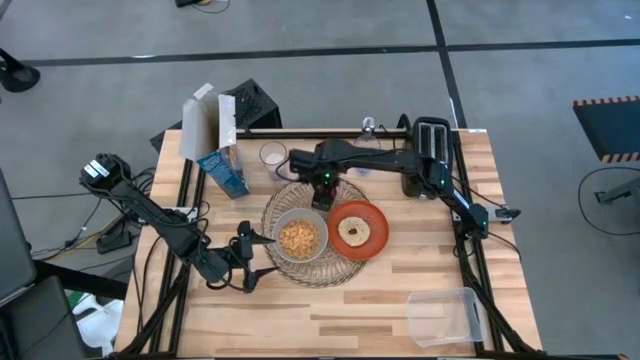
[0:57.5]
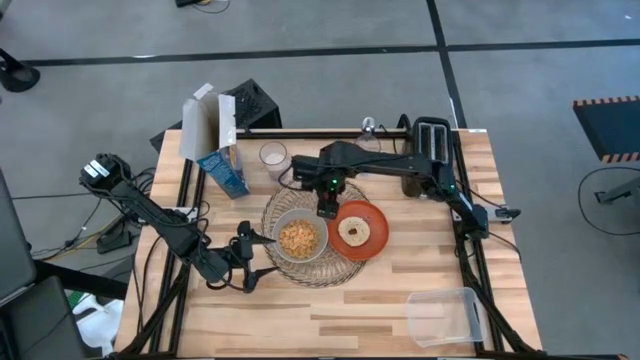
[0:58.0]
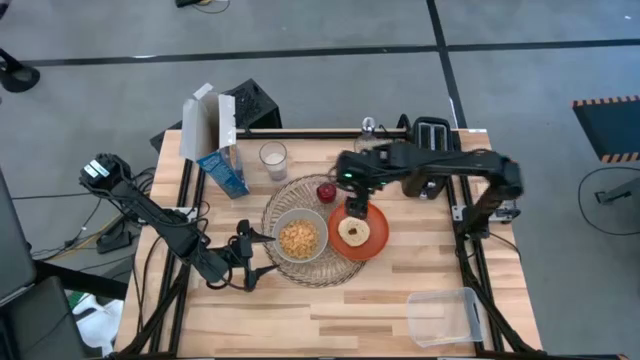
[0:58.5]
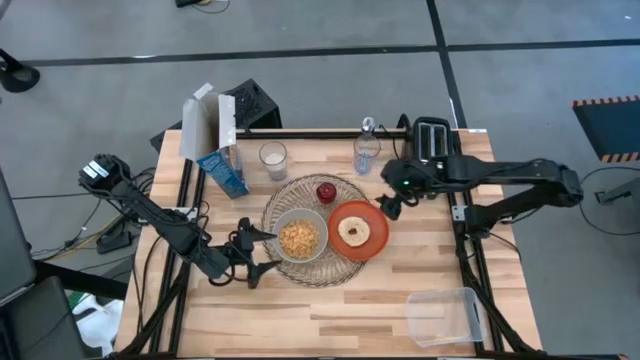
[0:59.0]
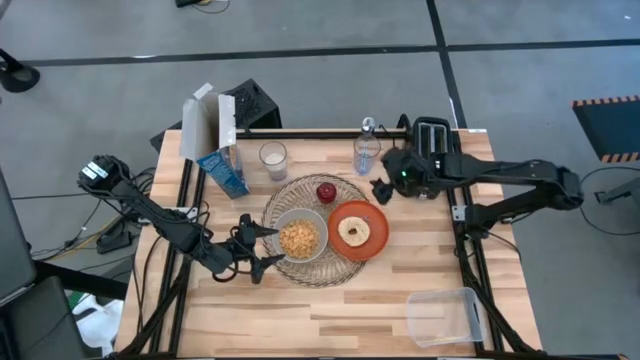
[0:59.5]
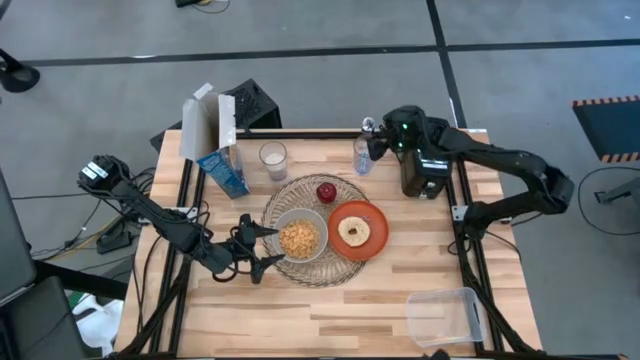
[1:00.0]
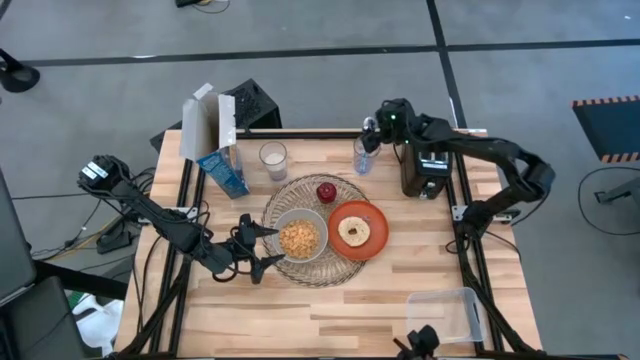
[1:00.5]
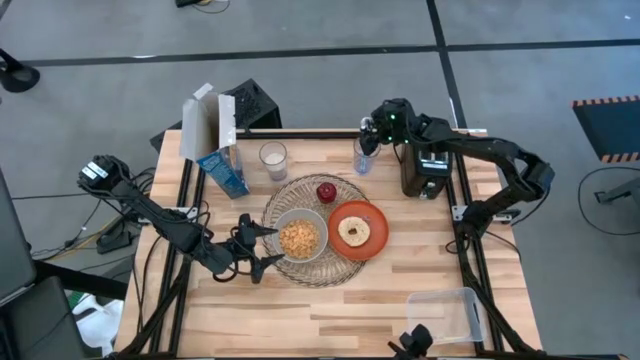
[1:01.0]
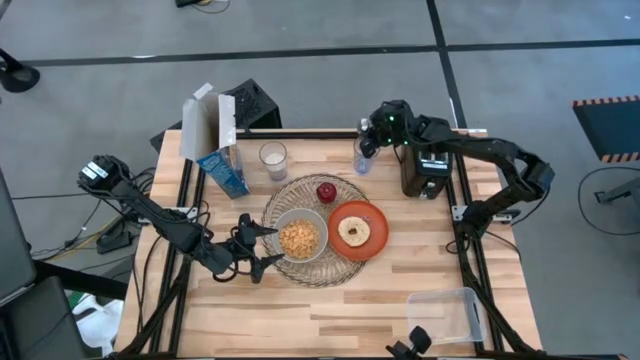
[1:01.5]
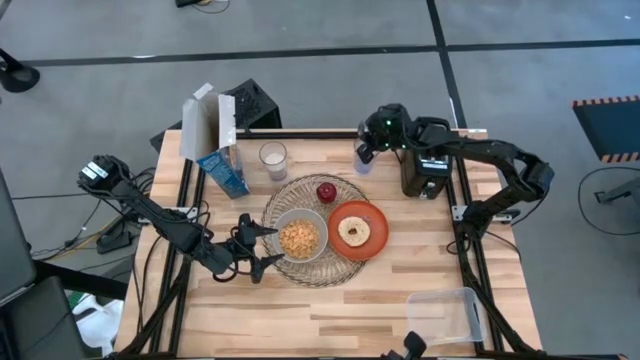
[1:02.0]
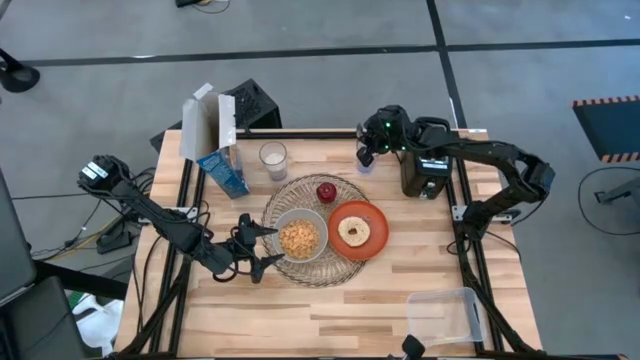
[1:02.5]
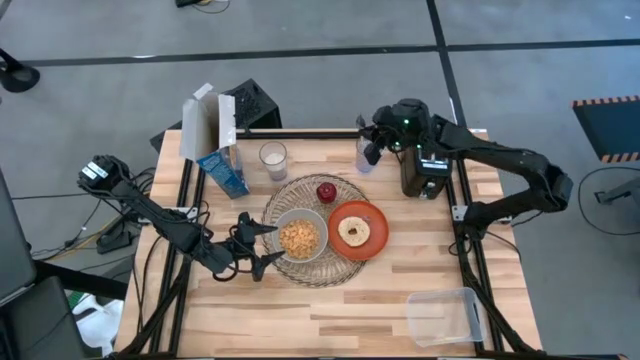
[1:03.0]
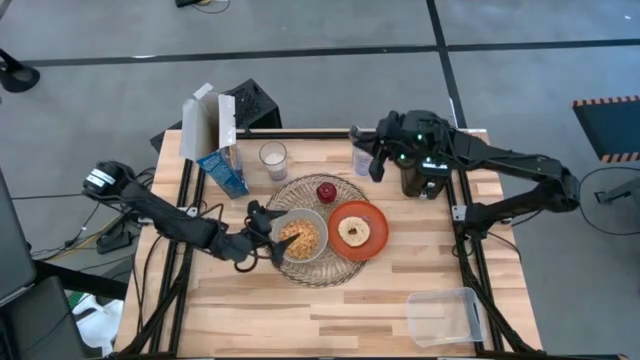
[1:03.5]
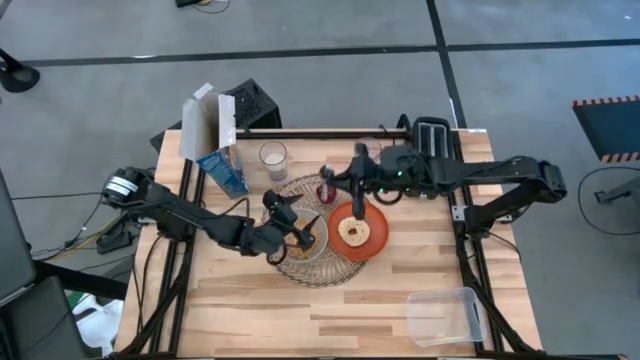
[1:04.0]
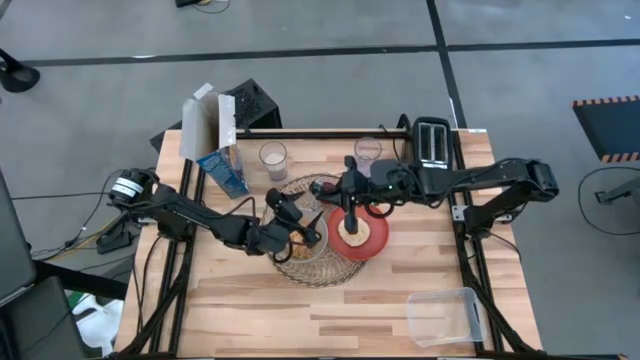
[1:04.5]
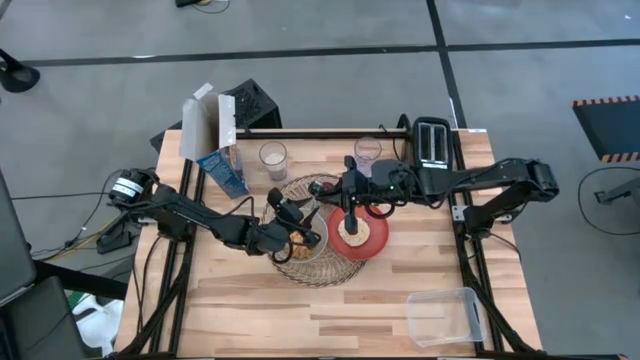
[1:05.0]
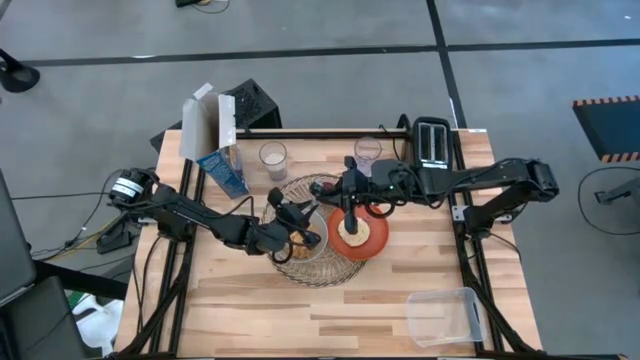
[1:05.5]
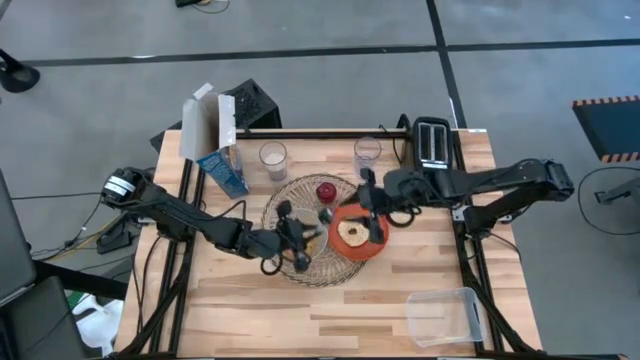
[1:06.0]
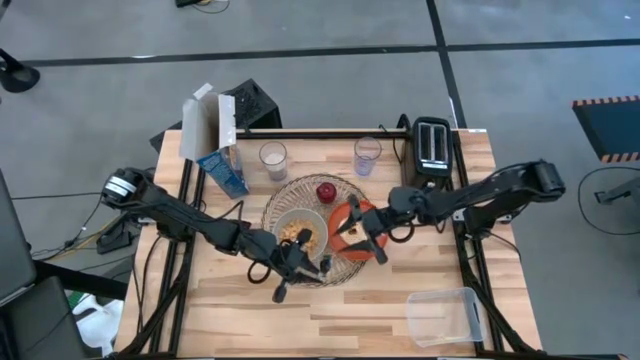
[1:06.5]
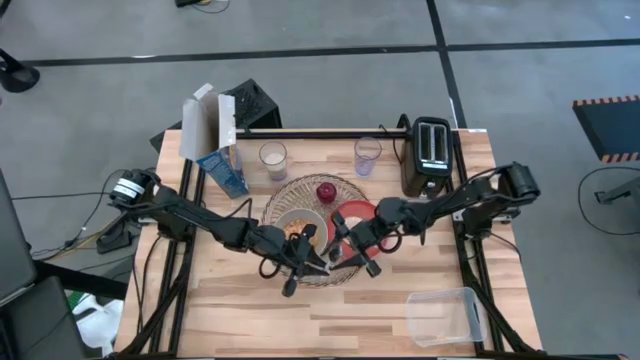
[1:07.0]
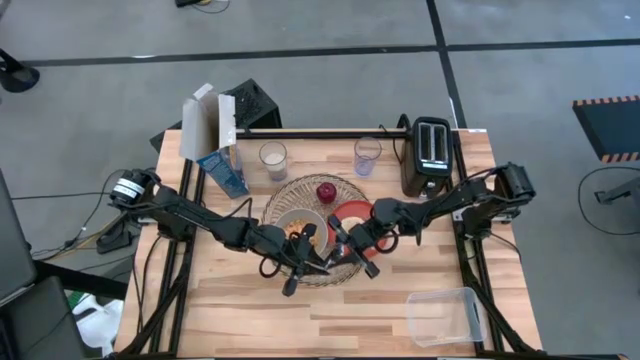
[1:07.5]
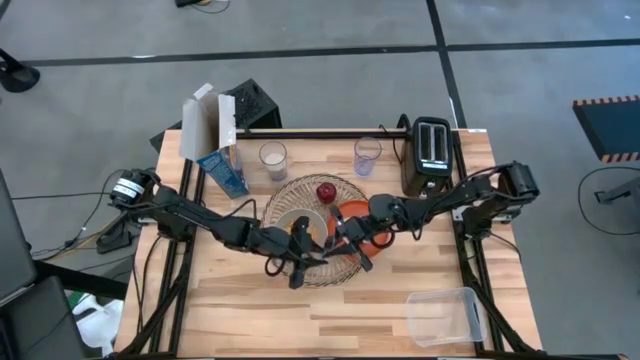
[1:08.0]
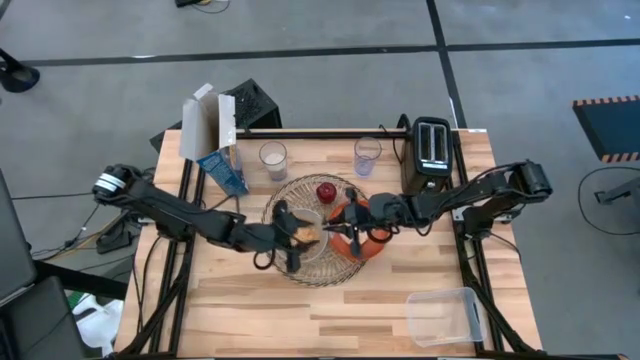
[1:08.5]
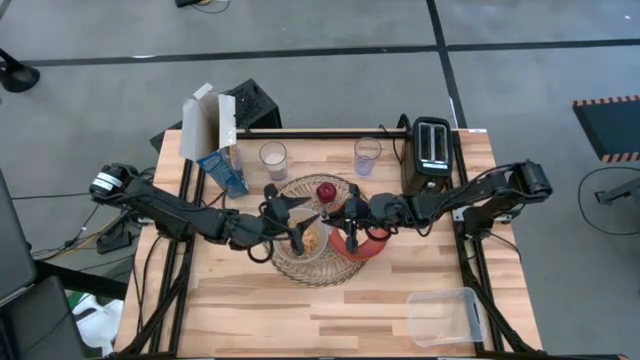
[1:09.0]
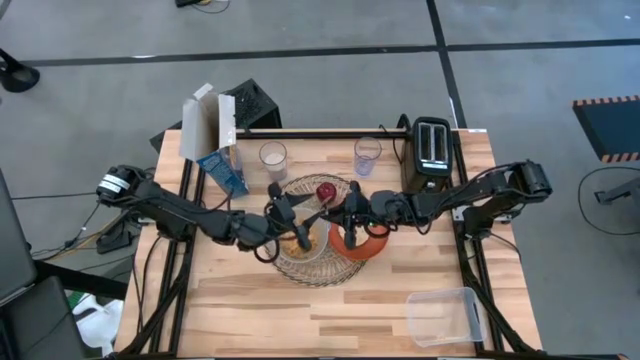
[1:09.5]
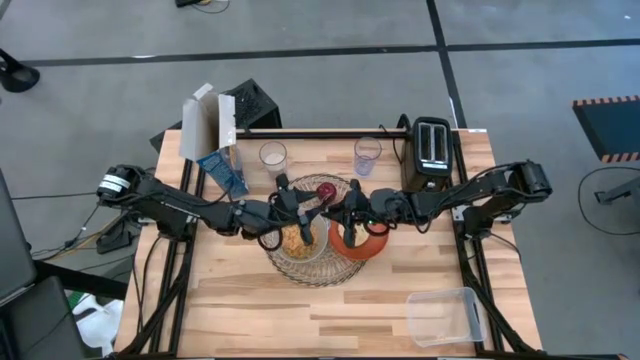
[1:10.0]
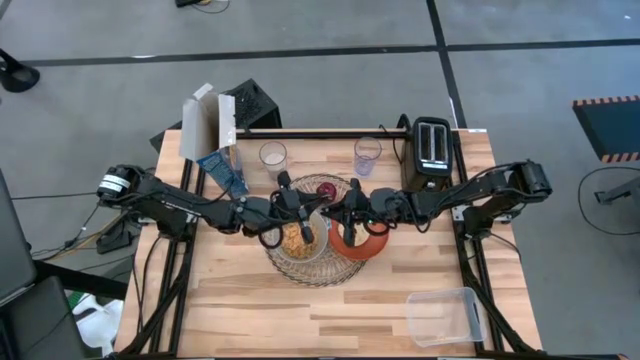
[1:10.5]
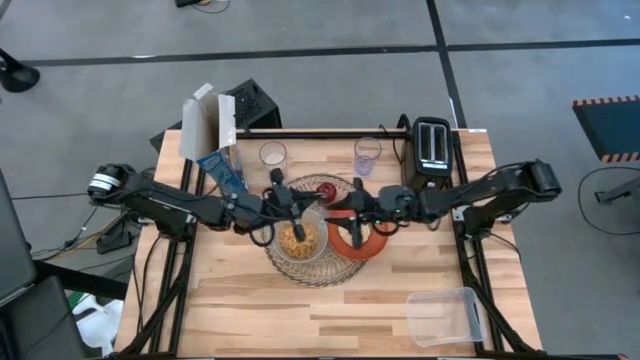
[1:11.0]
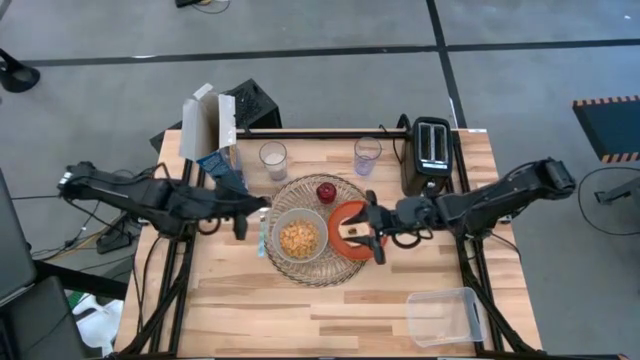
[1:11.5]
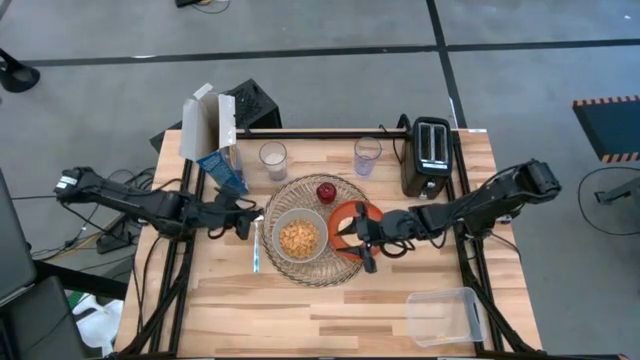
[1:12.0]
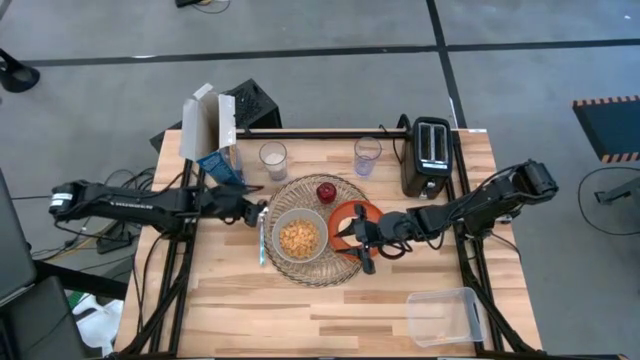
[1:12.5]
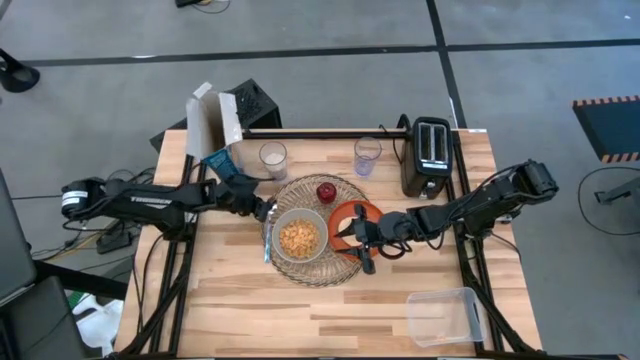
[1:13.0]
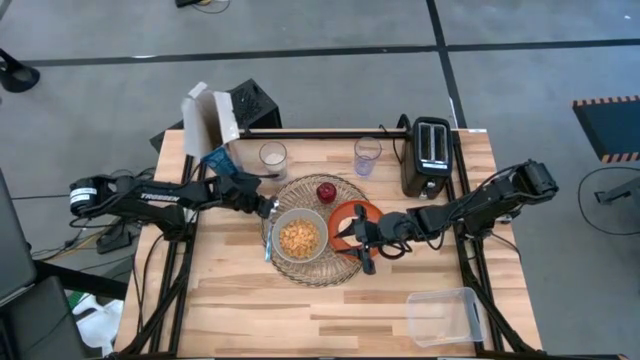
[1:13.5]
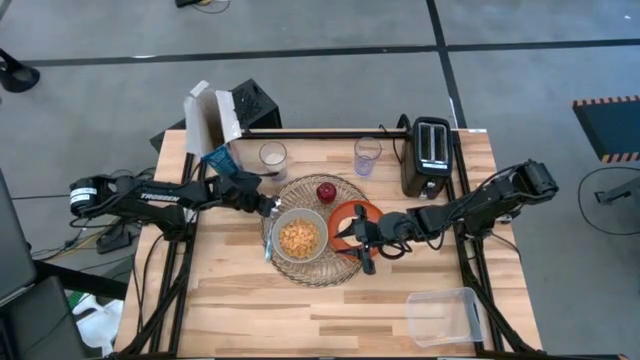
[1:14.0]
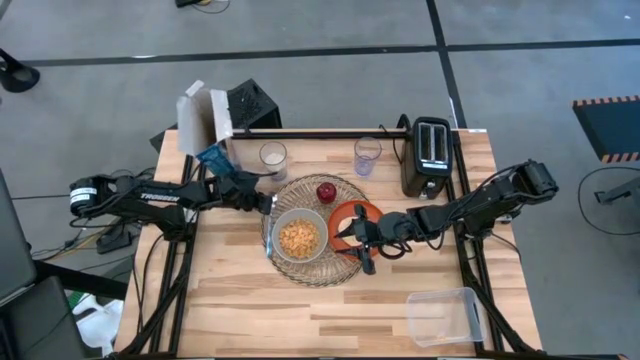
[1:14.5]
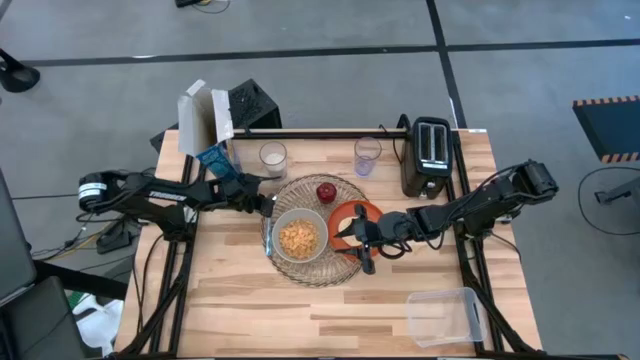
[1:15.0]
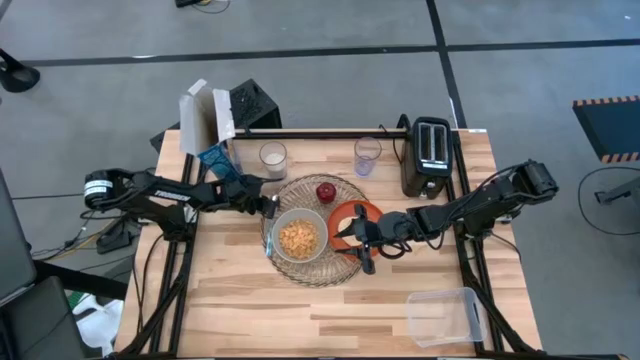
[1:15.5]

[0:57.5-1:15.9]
Task: Arrange a breakfast setting
Put the blue patterned spoon on the brown placemat to left side of the white bowl

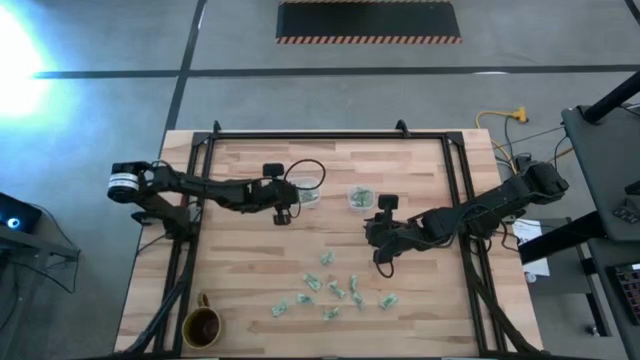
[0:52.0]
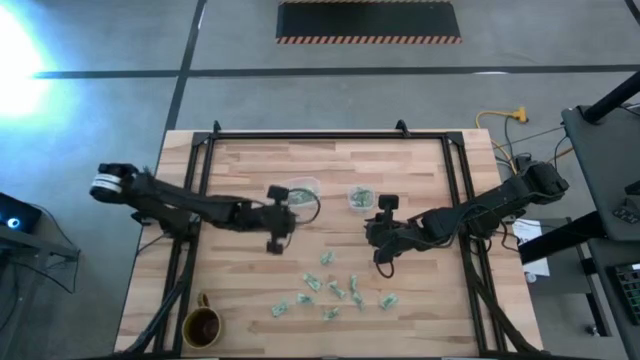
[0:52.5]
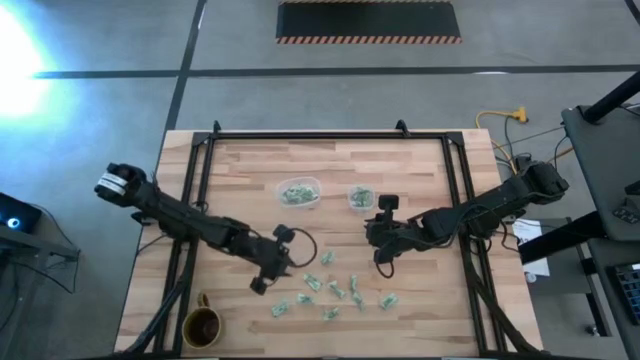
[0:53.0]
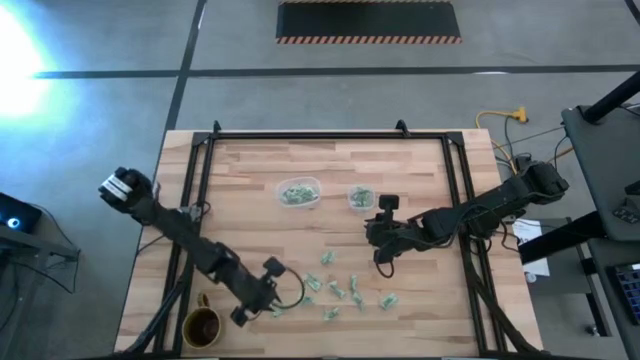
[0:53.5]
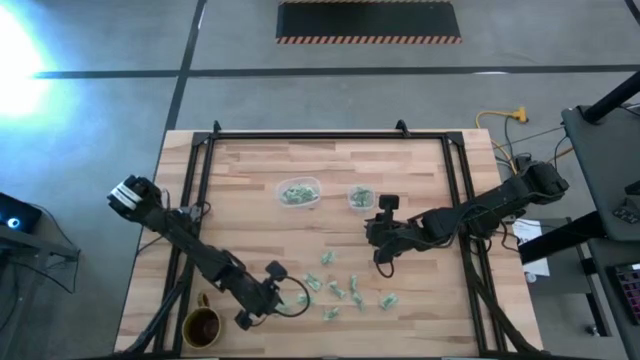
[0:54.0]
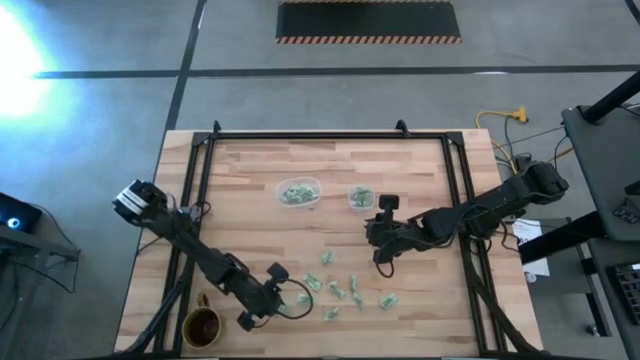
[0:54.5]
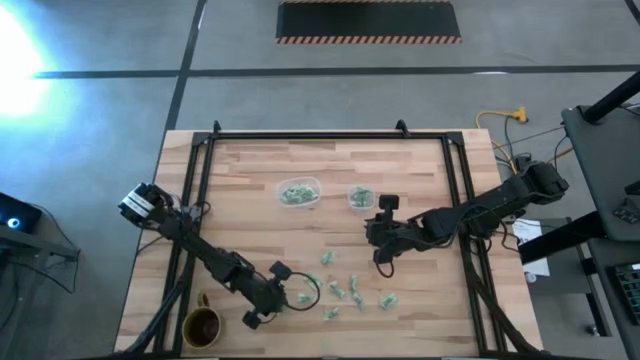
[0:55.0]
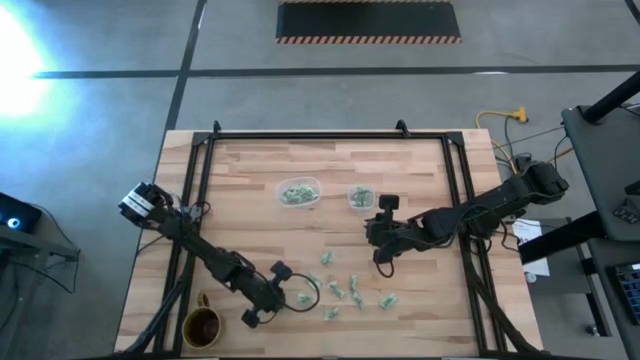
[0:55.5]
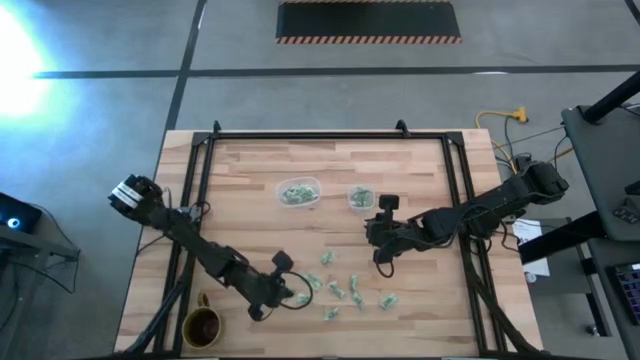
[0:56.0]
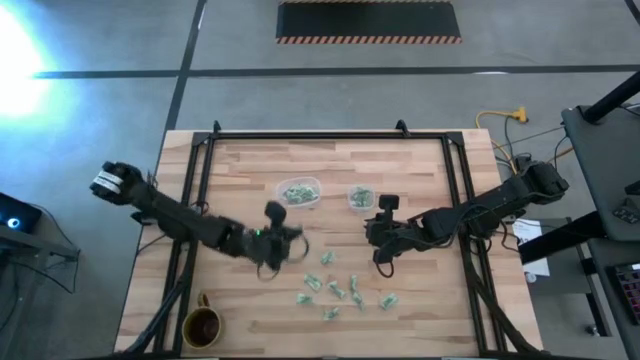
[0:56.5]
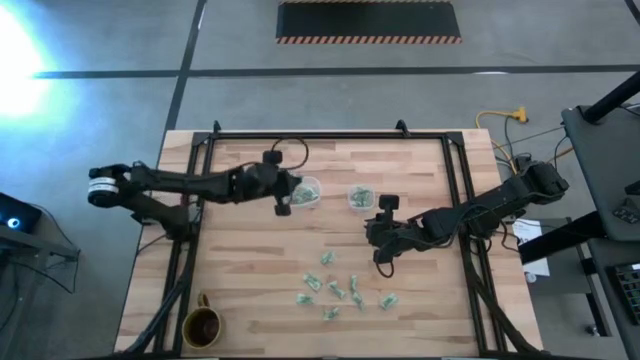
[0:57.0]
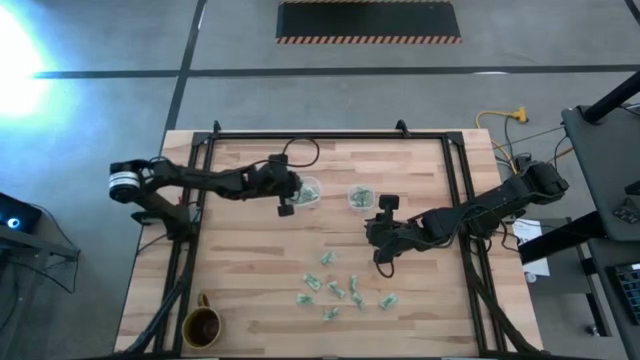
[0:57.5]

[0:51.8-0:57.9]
Task: Pick and place Stevia / Truvia into bins
Put the stevia packet into the transparent oval container
